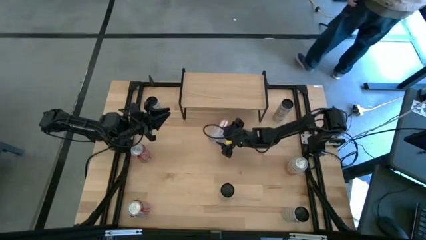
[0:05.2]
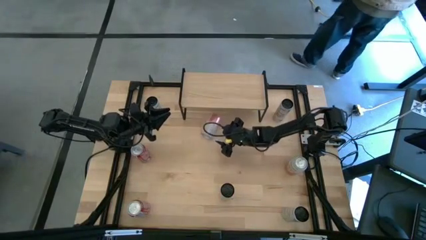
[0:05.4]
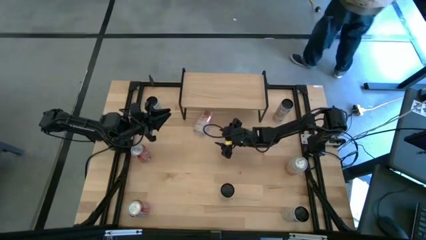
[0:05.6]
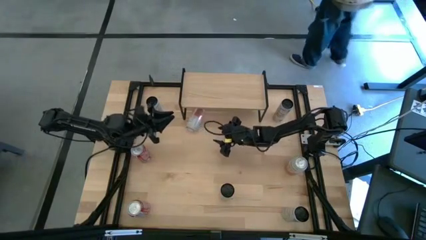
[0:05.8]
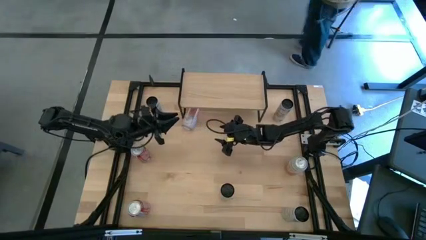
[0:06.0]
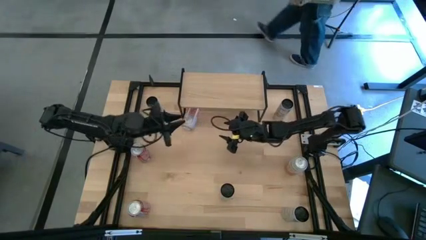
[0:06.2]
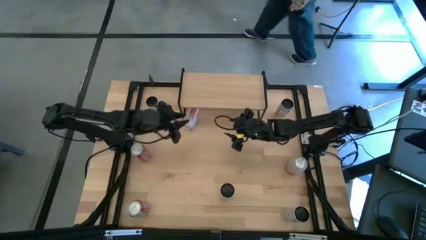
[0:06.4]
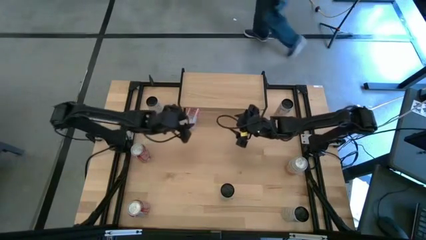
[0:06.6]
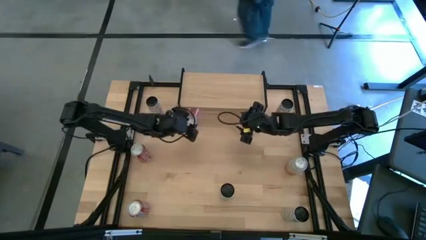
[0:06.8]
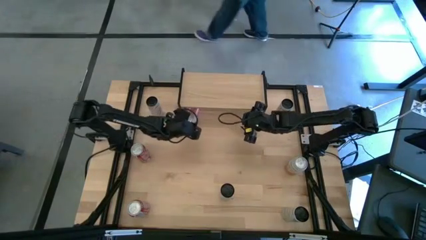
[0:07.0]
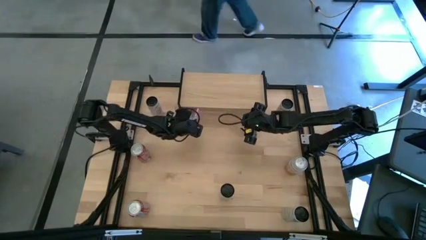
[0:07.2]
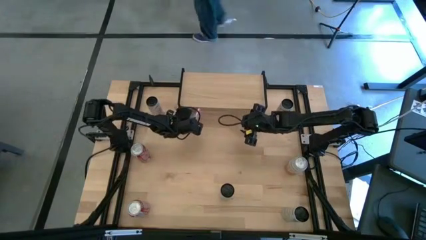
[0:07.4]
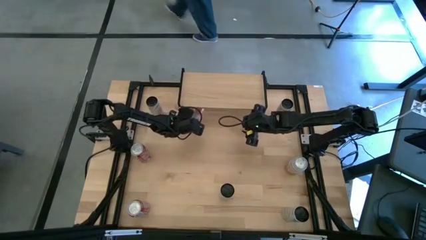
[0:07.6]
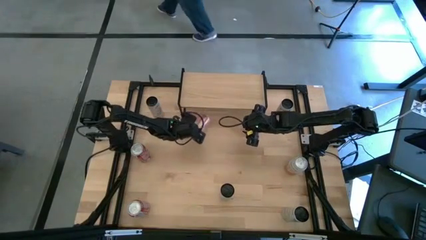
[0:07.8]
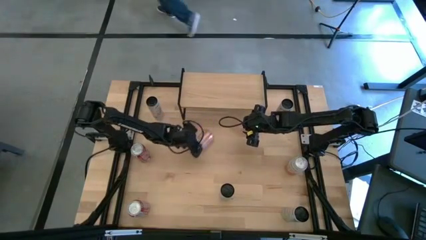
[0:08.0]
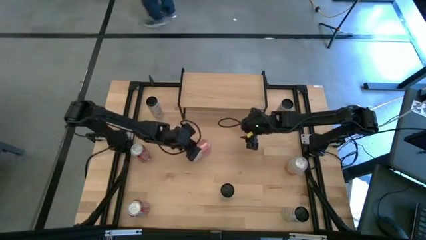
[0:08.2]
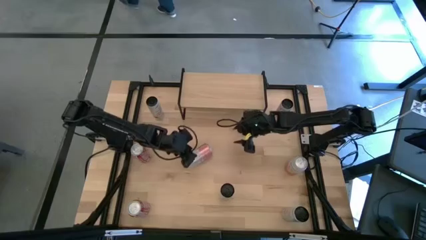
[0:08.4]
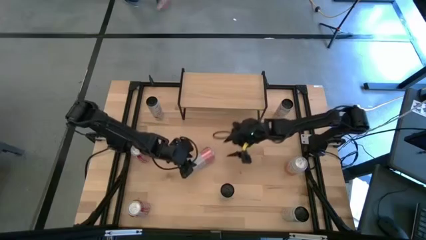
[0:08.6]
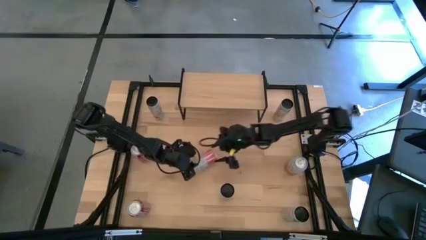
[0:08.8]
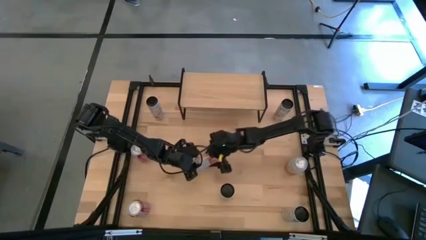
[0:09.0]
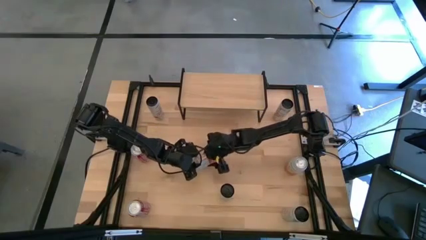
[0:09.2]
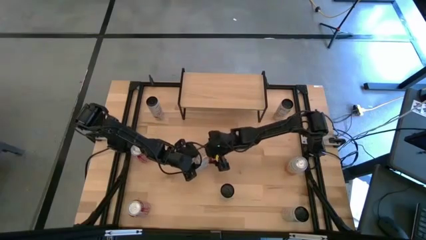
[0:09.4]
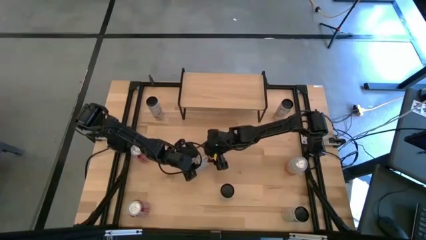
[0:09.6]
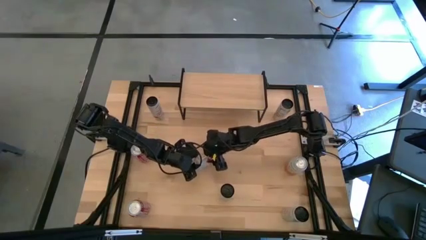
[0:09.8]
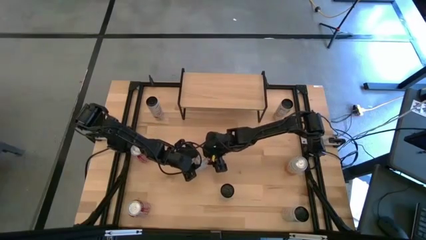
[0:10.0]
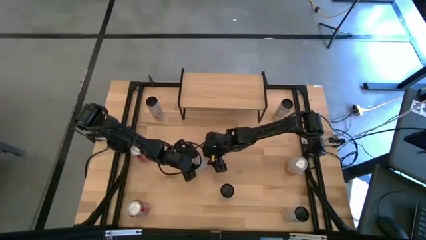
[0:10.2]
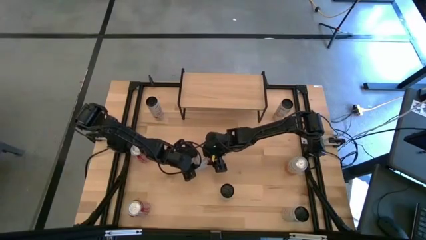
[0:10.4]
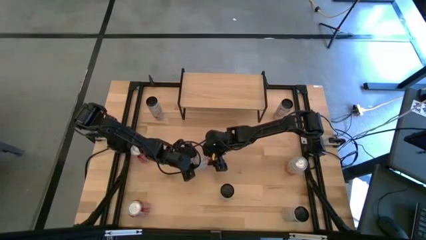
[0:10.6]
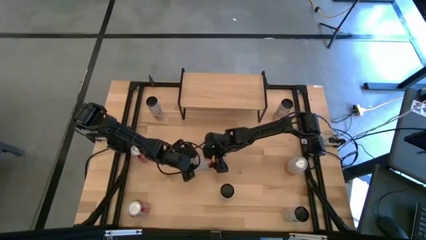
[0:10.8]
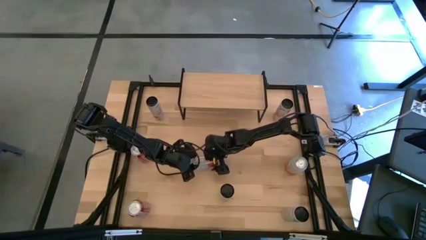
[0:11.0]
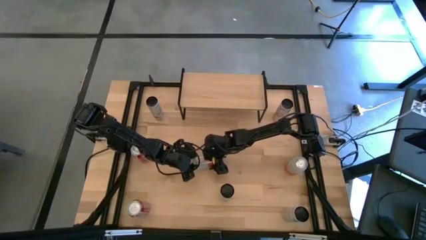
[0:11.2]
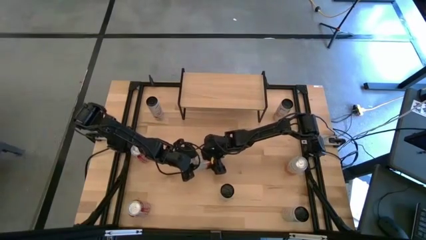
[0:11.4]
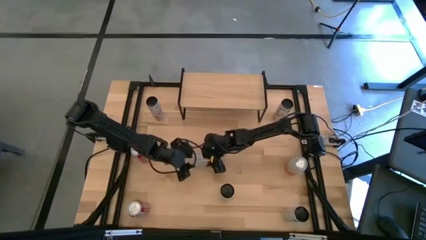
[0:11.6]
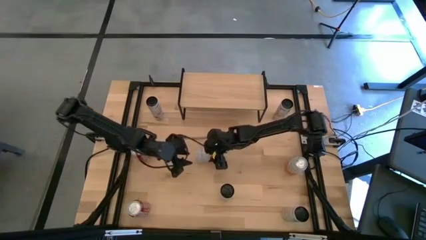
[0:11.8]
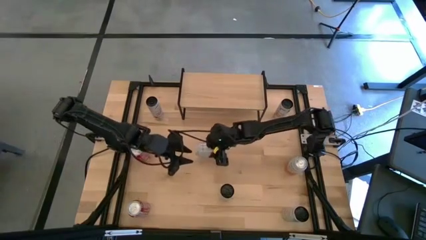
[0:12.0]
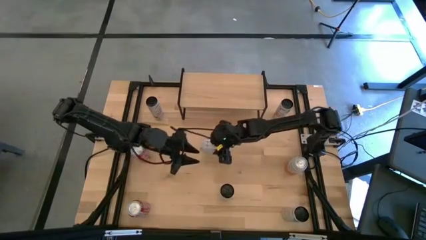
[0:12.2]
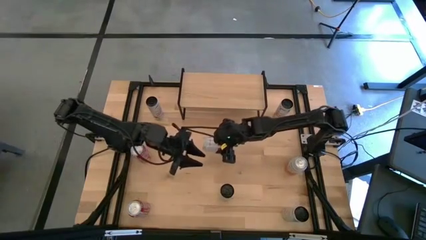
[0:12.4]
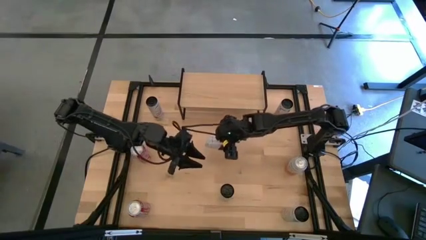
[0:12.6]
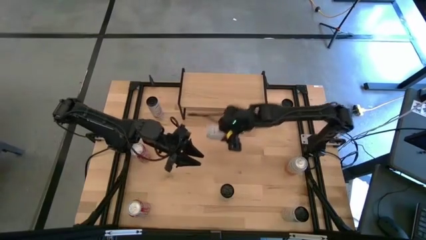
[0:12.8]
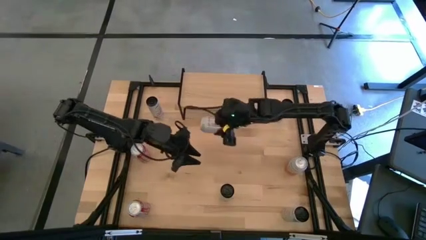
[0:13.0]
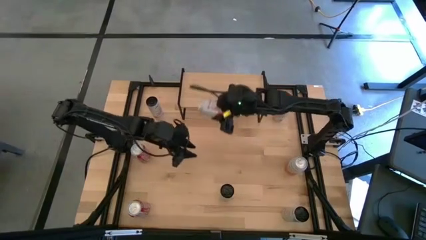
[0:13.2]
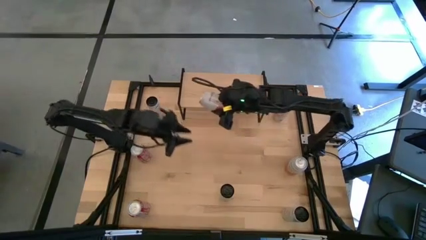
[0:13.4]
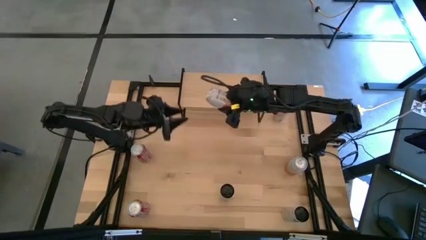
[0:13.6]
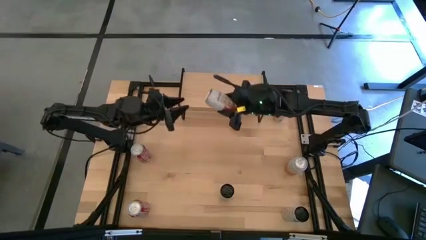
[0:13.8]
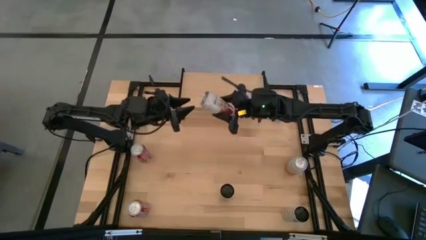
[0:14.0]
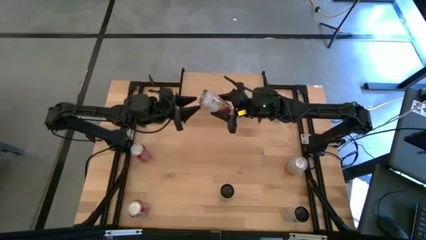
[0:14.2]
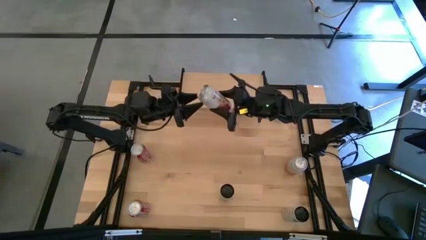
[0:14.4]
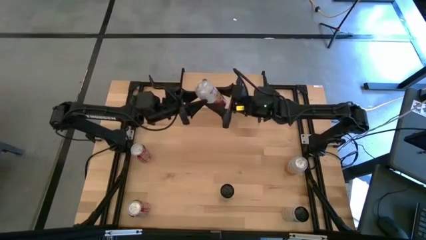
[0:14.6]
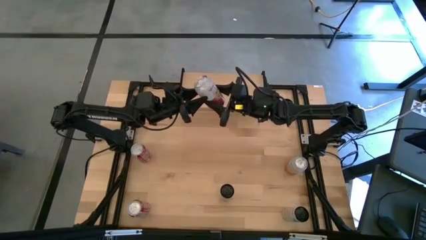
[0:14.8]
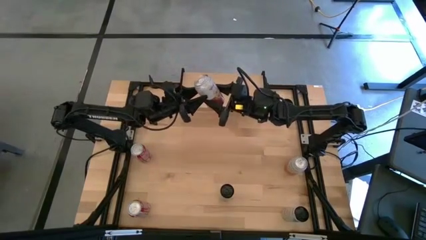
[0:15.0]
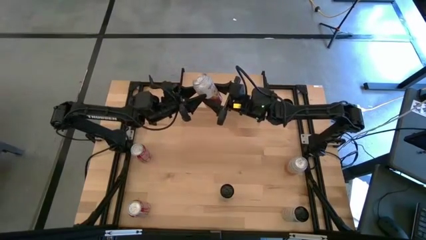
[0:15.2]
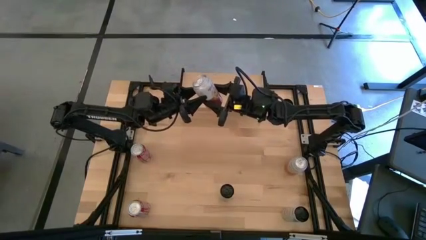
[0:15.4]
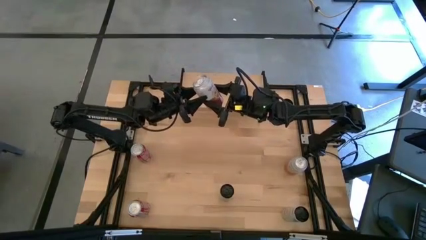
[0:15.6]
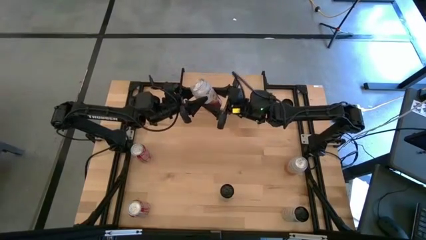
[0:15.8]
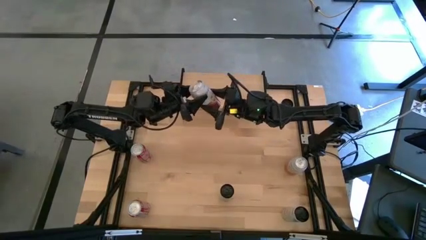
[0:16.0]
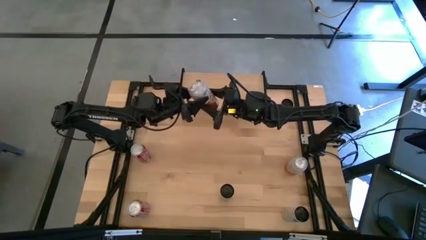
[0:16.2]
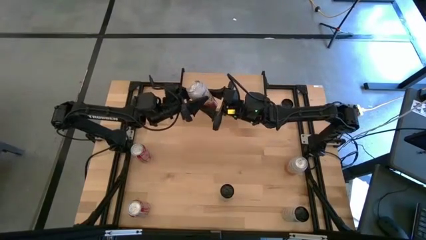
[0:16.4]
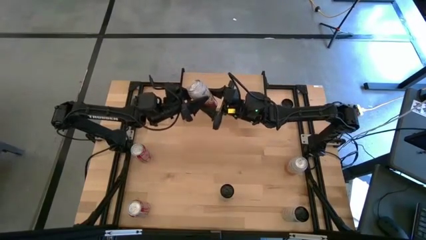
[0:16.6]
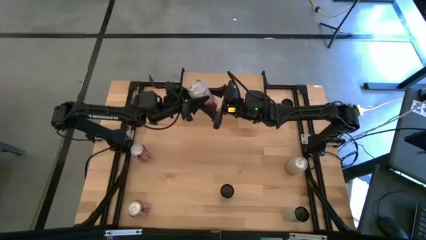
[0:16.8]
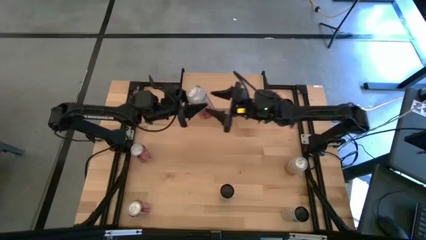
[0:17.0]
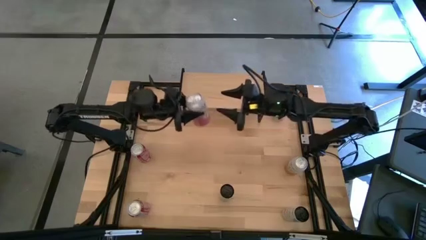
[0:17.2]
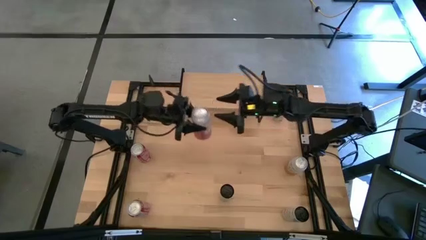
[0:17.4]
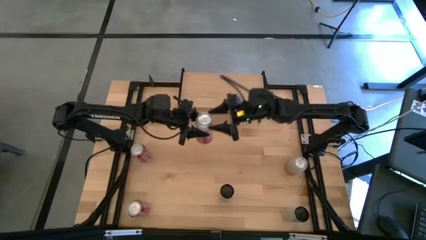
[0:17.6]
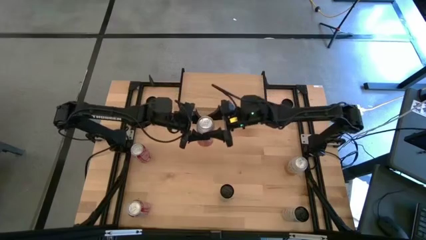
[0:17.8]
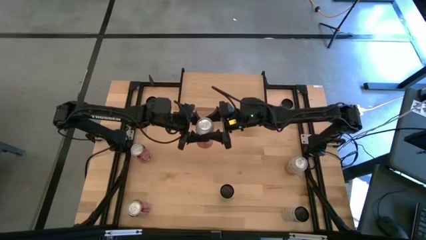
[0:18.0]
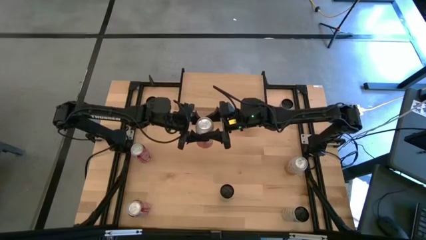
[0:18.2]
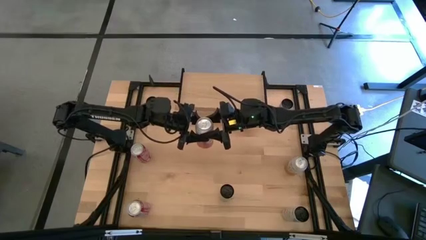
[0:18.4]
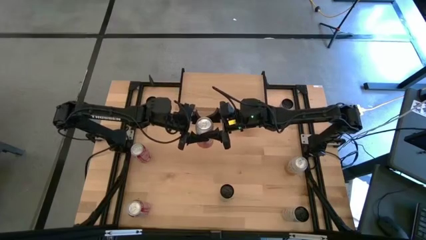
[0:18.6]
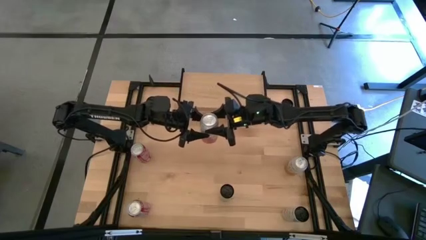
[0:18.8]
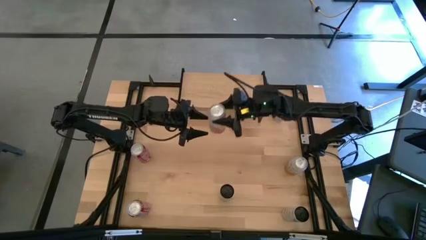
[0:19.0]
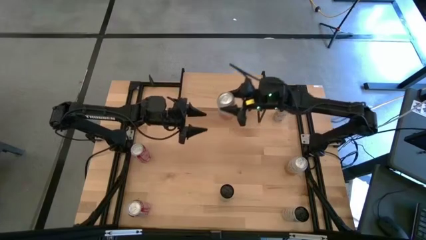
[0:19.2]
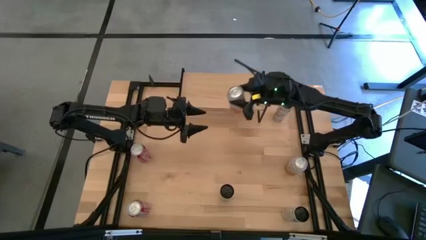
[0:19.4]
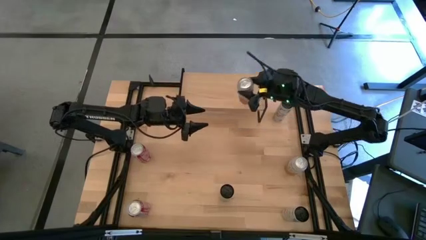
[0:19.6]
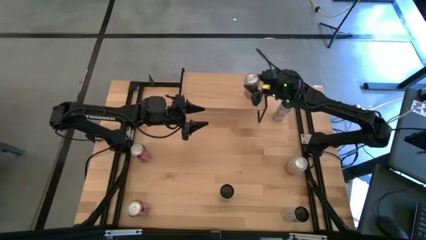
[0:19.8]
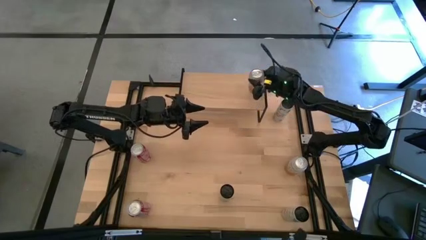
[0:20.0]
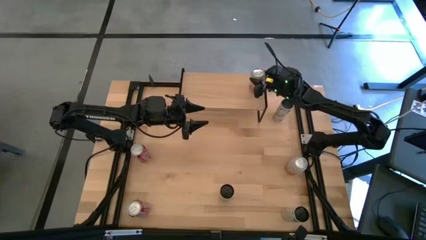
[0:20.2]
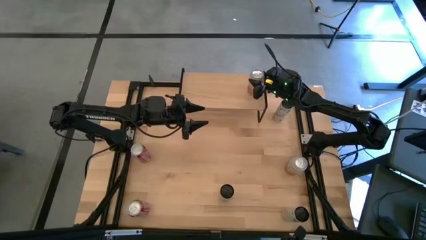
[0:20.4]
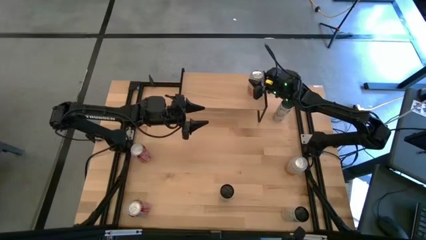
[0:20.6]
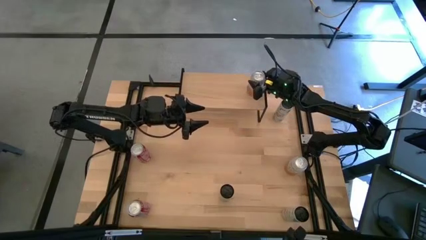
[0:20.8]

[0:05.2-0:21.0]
Task: Place canned beverage on shelf
Put the left orange white soda can on the shelf
